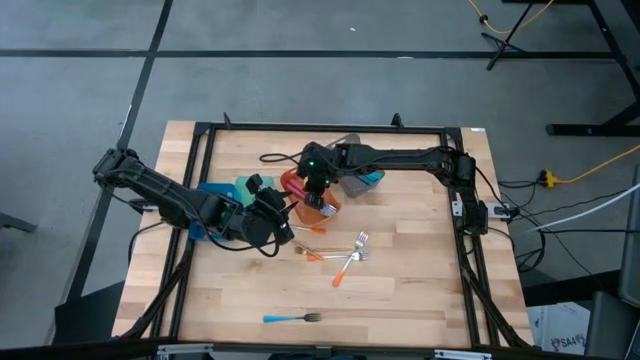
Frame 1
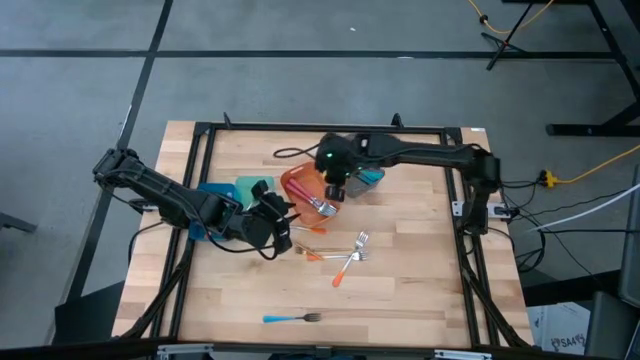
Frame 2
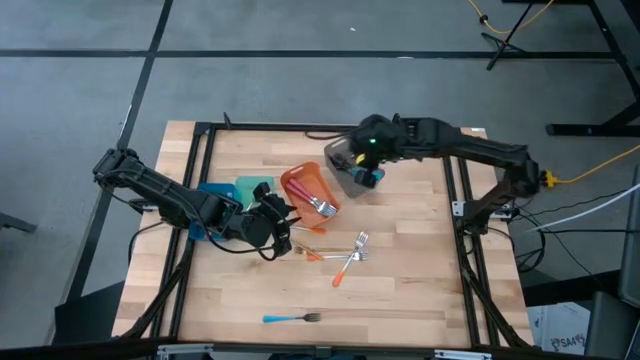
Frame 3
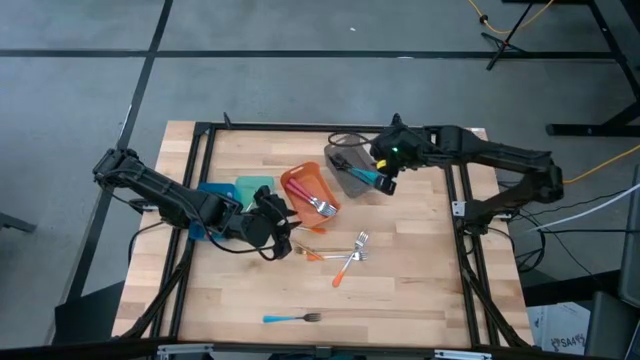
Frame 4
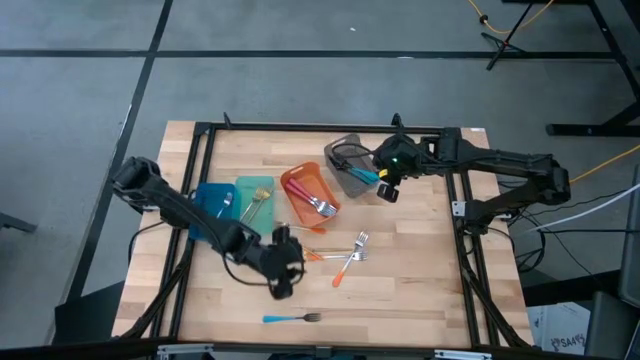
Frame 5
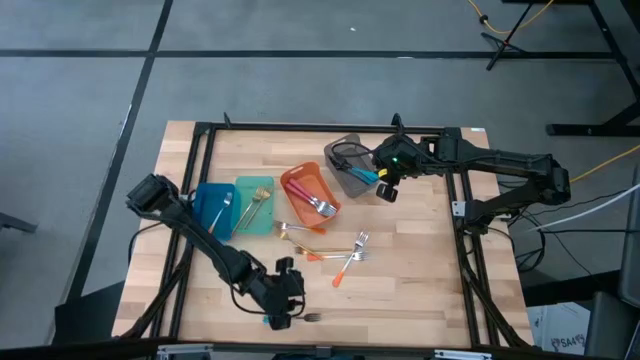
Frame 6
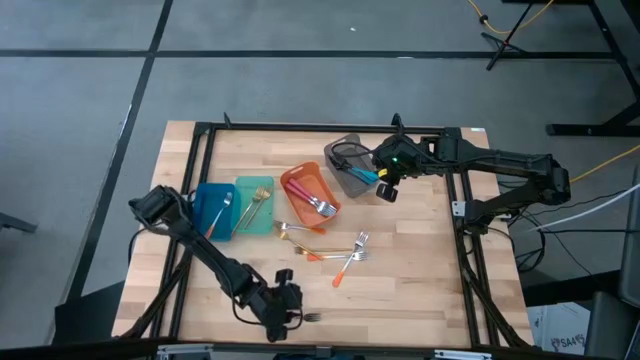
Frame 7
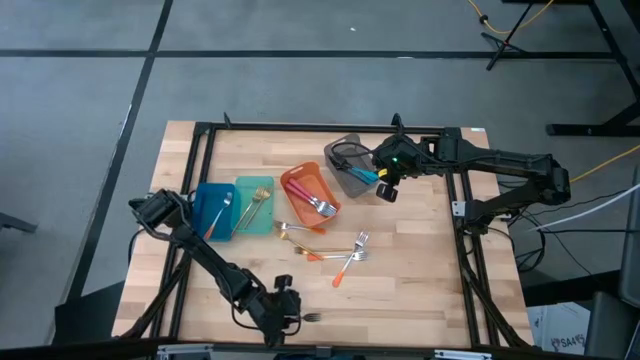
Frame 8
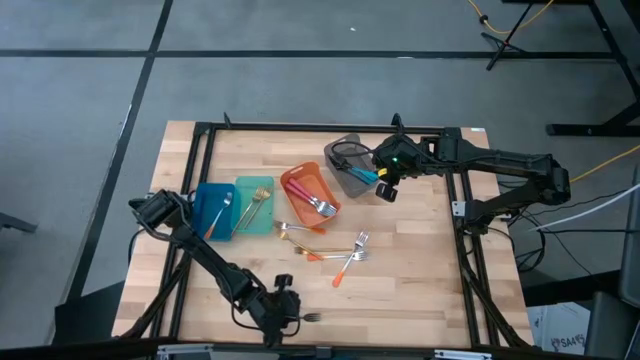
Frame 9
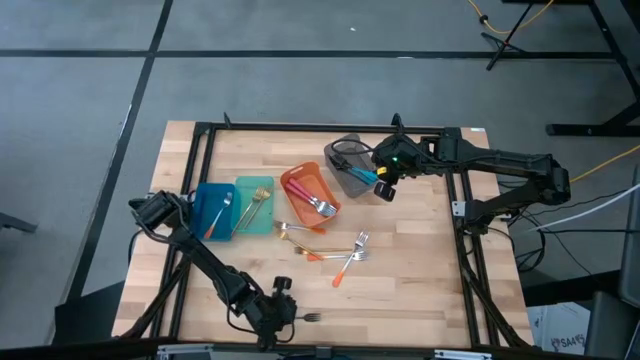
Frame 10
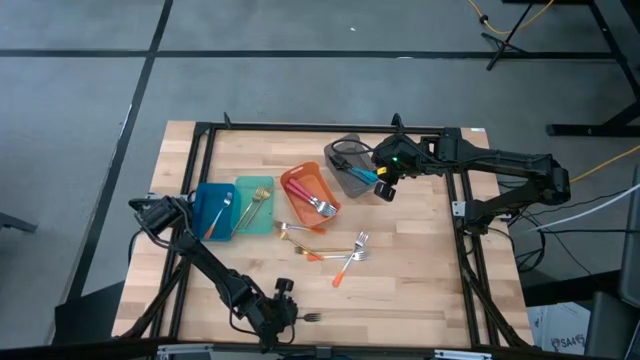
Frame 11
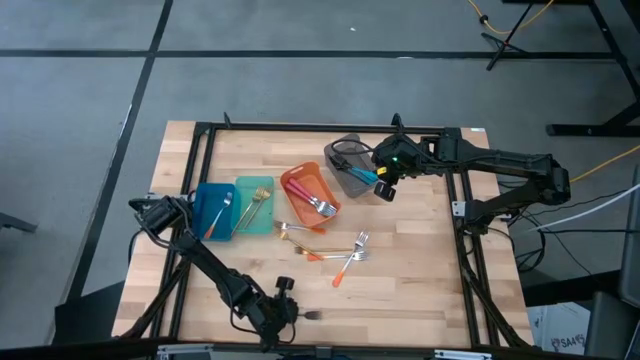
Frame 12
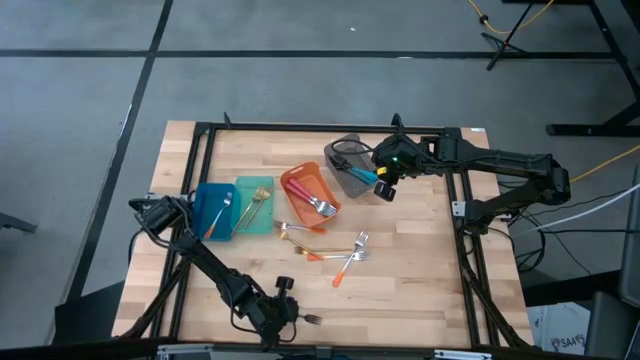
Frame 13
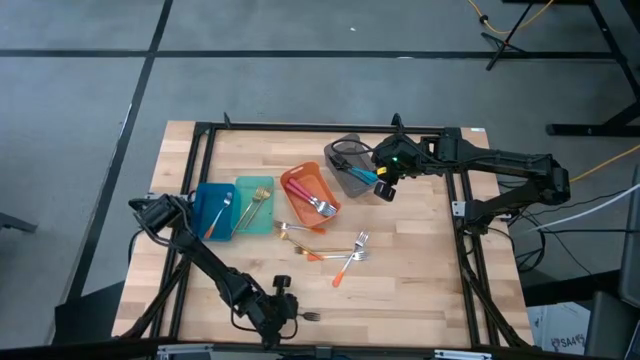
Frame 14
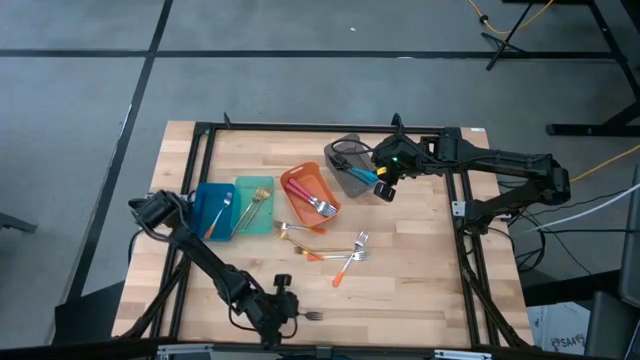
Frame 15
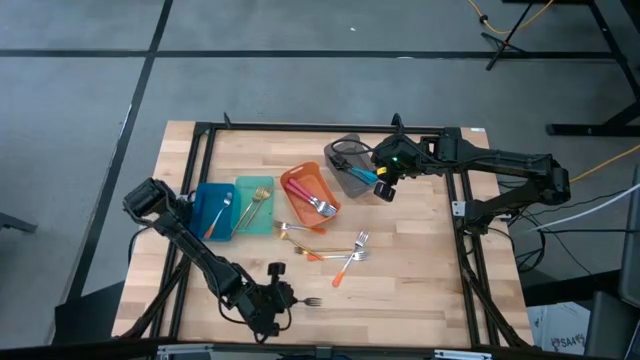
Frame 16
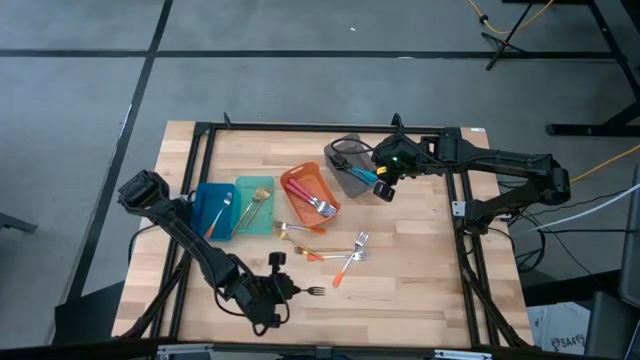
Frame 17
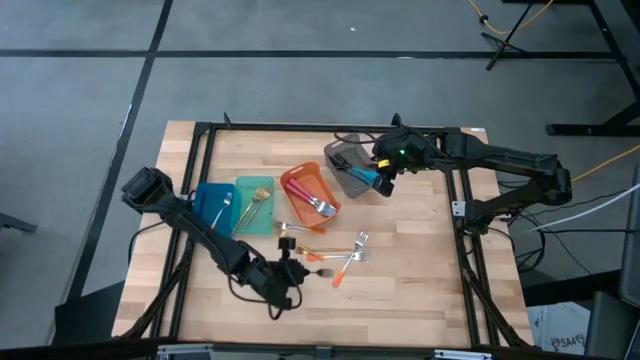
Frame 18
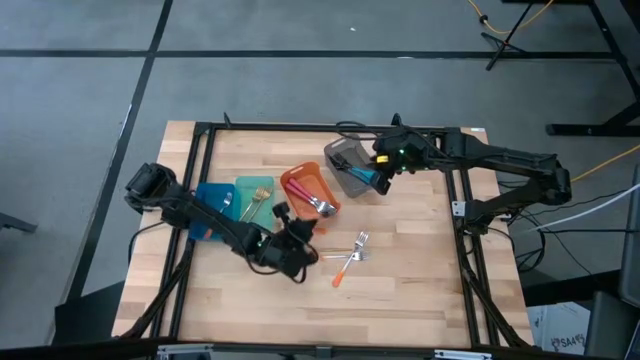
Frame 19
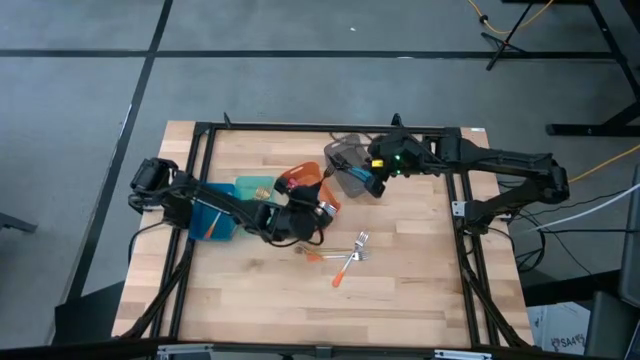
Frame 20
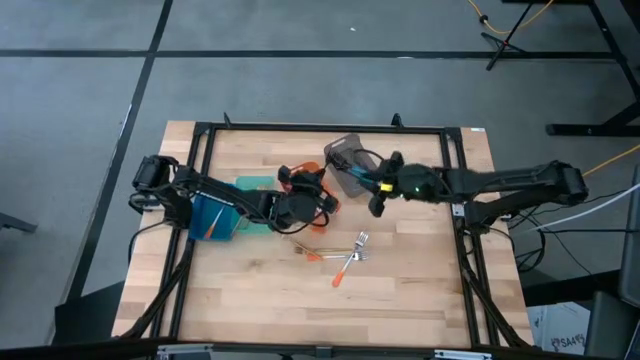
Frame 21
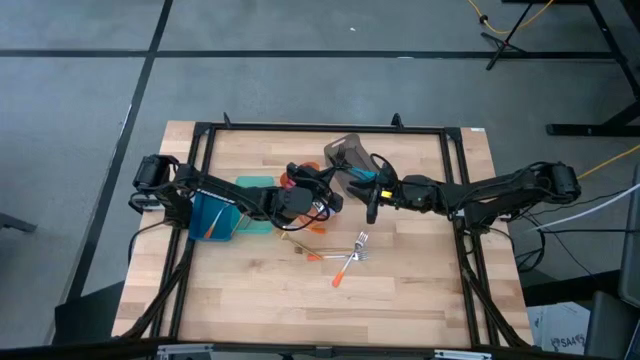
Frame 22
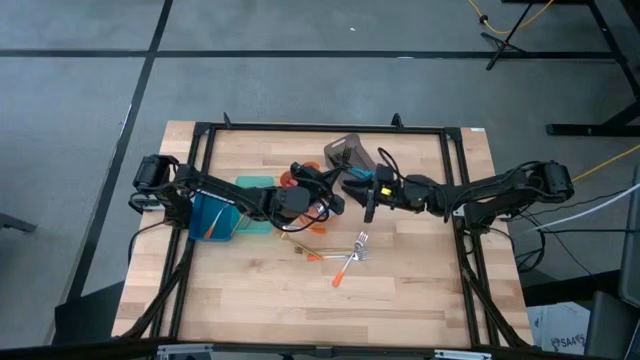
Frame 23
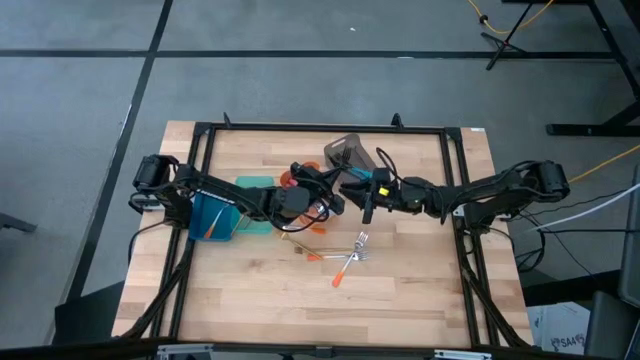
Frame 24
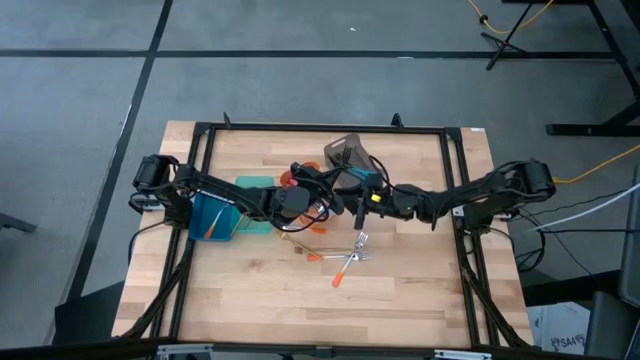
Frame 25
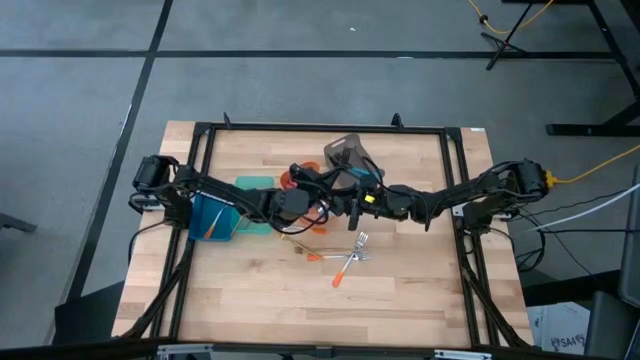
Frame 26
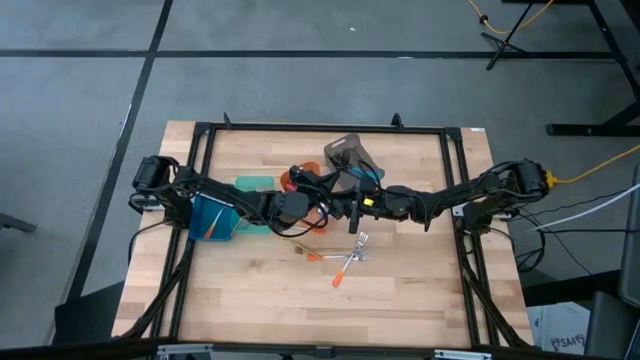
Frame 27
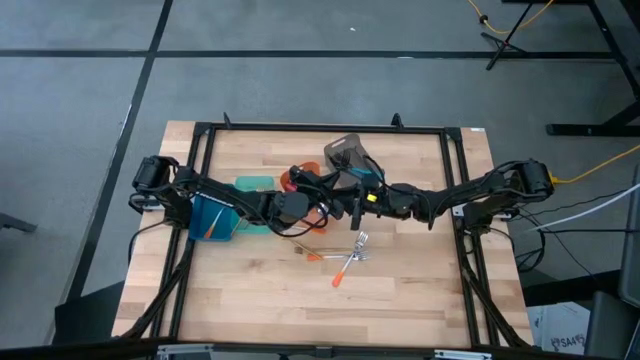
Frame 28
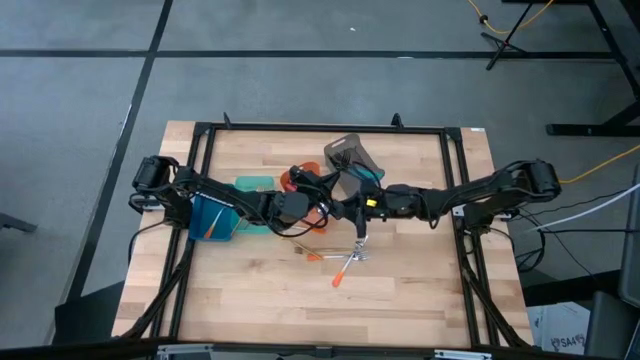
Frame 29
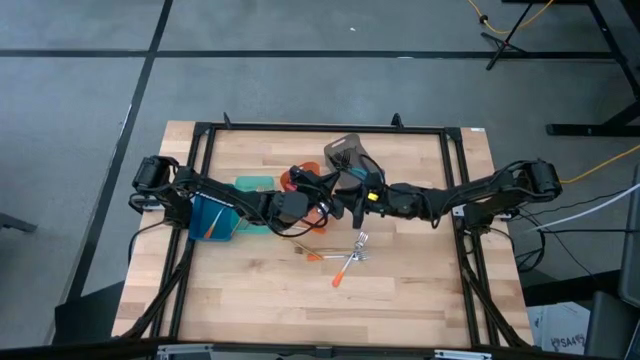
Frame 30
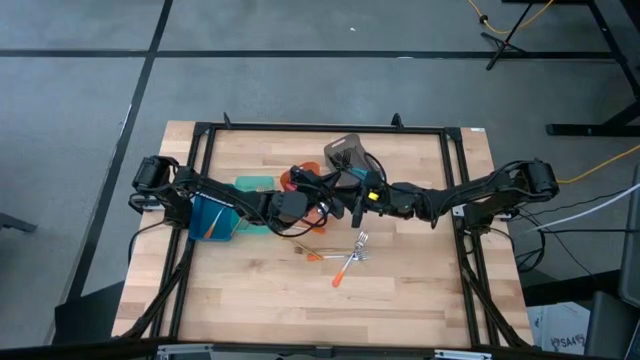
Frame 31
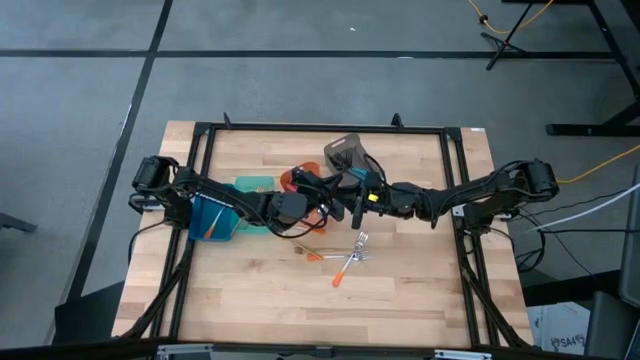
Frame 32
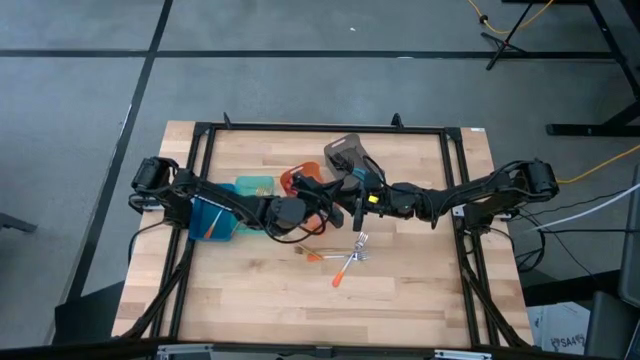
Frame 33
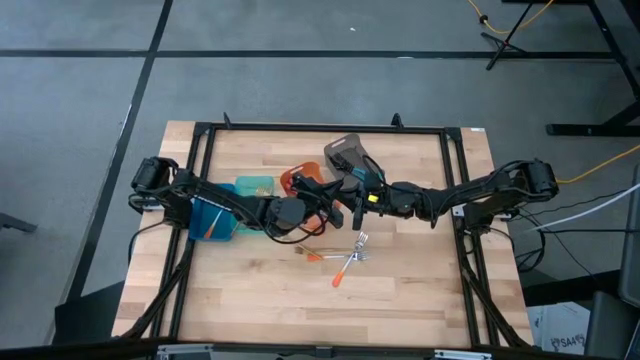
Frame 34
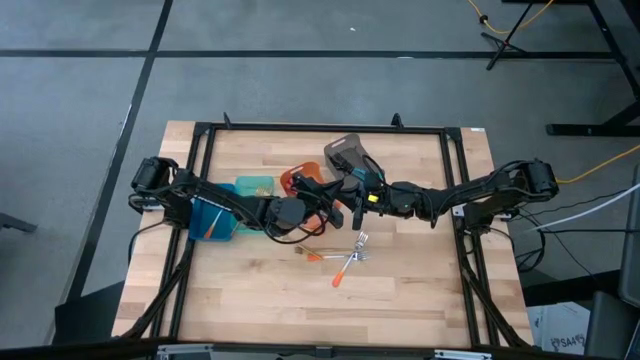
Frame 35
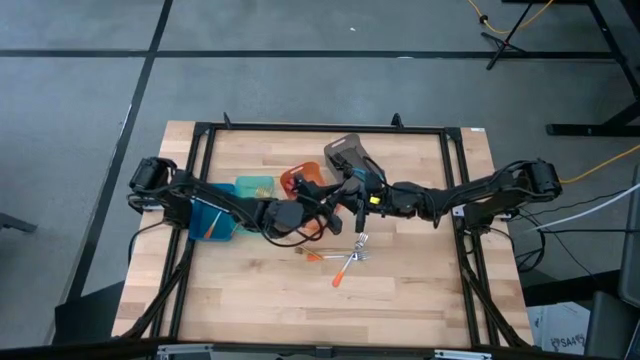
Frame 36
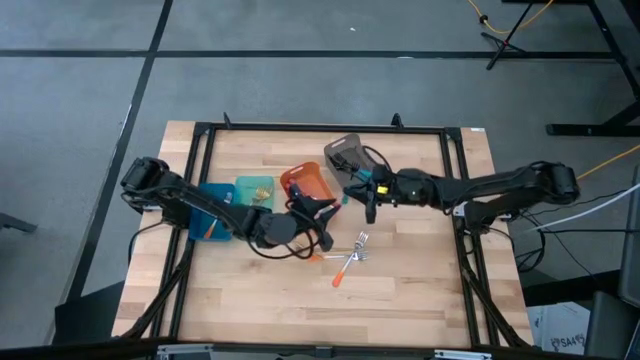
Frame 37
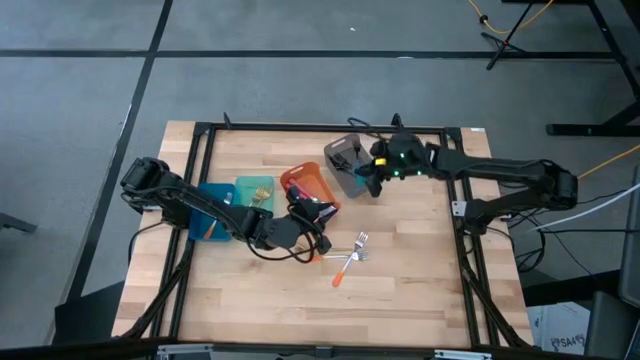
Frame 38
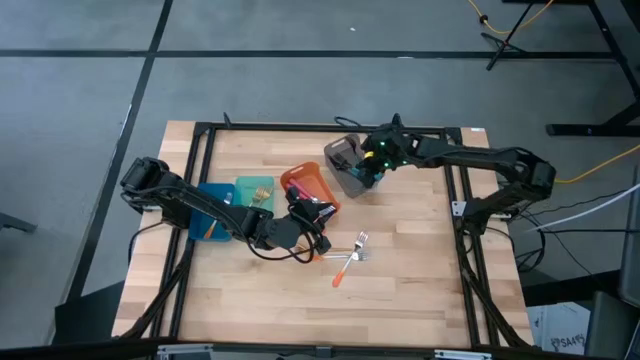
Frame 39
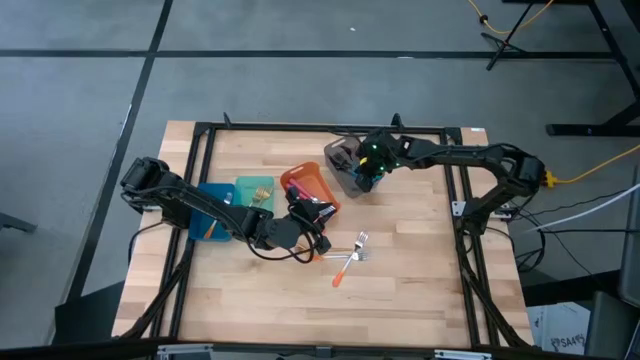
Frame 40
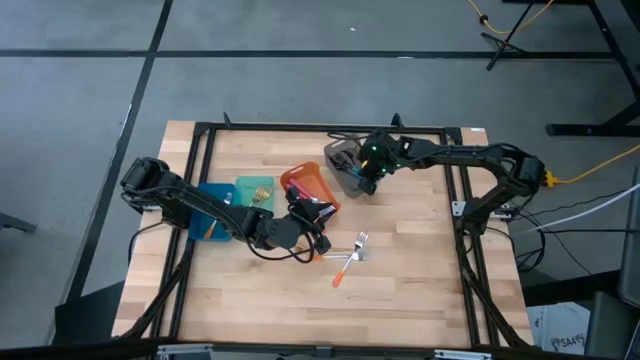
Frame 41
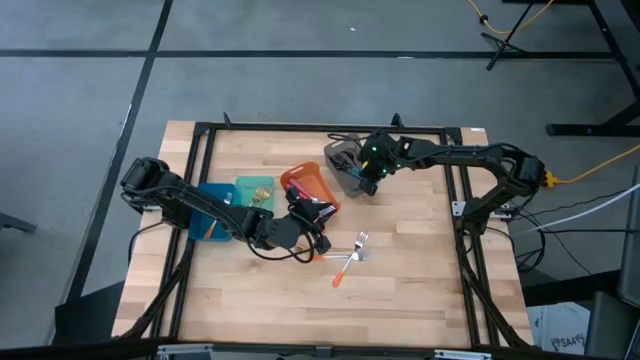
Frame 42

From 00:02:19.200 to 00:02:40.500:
Task: Sort silverware by color (type)
Put the blue fork into the black bin
